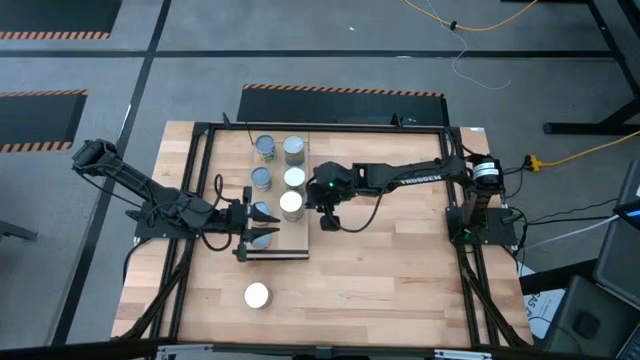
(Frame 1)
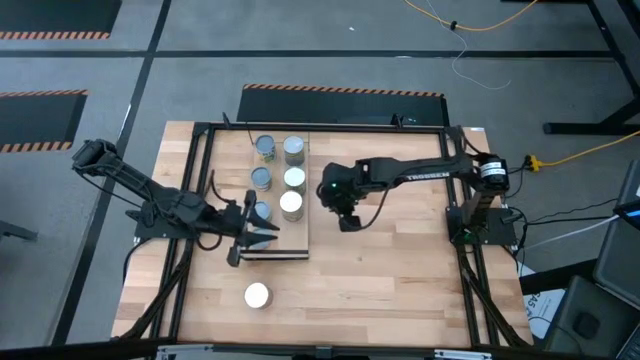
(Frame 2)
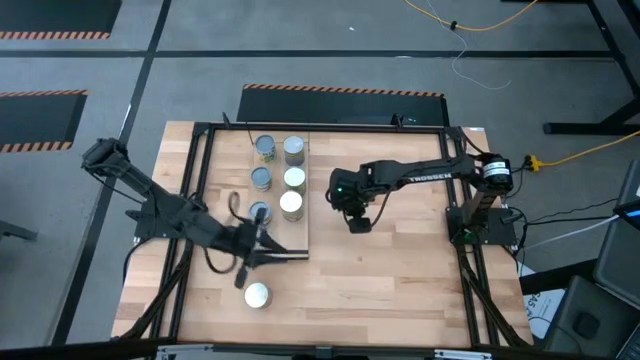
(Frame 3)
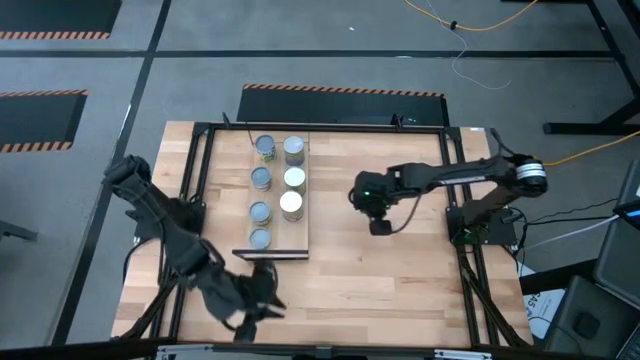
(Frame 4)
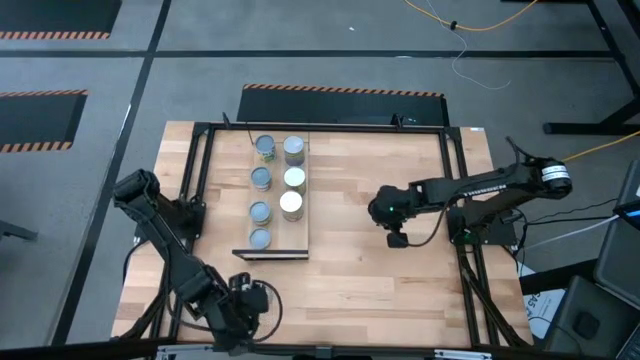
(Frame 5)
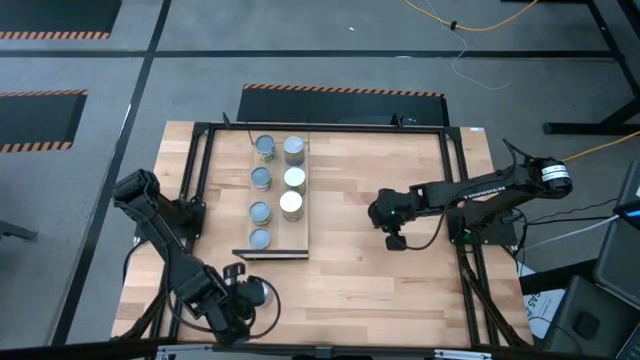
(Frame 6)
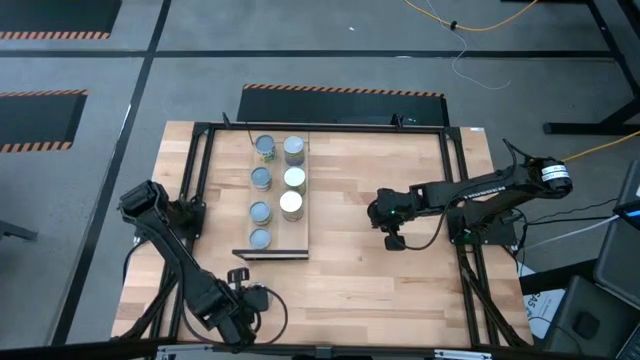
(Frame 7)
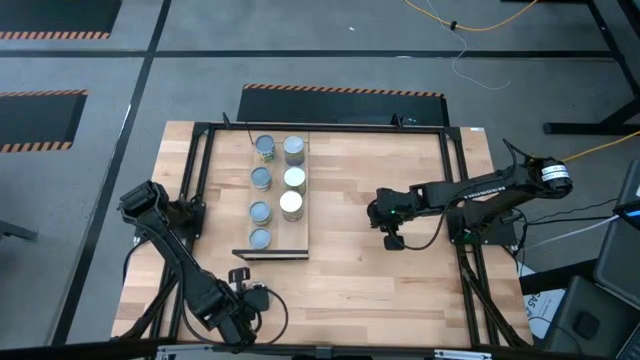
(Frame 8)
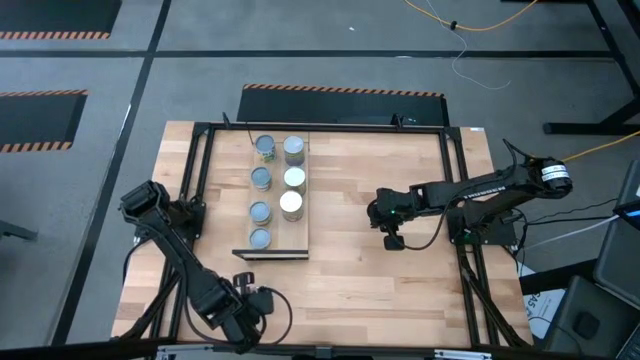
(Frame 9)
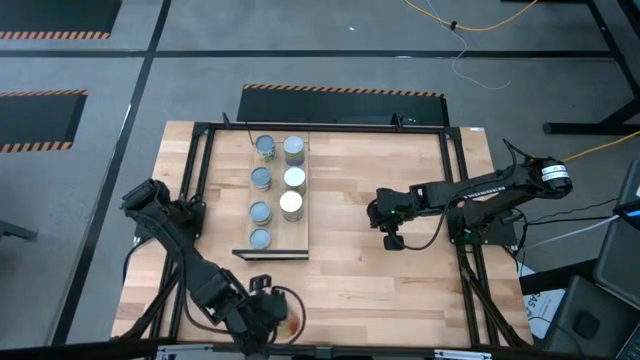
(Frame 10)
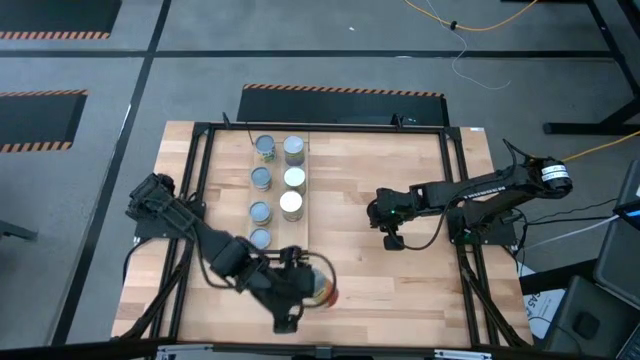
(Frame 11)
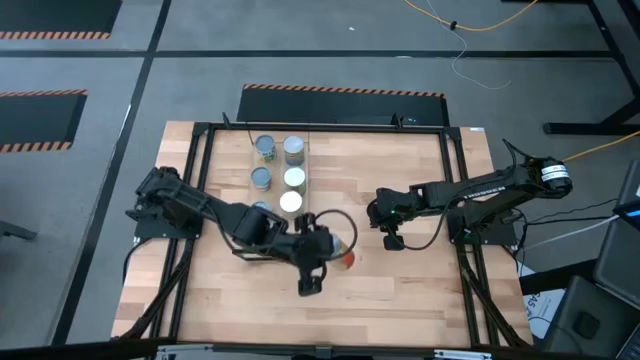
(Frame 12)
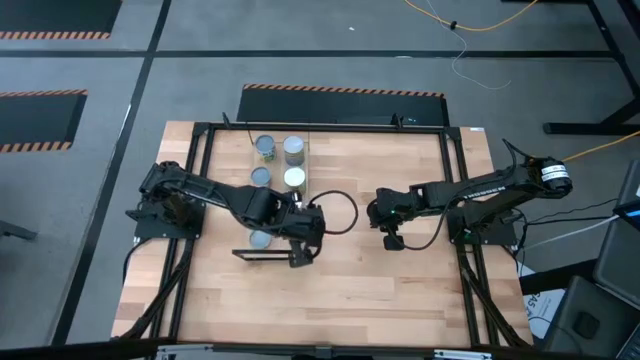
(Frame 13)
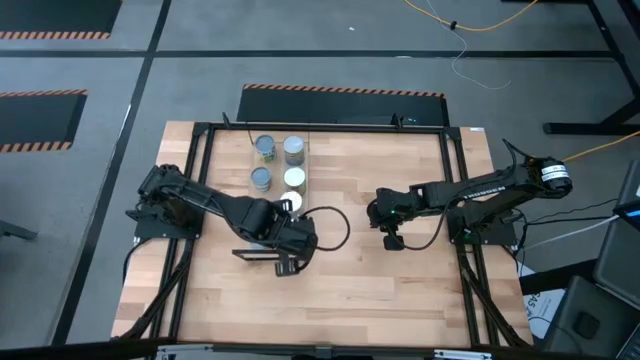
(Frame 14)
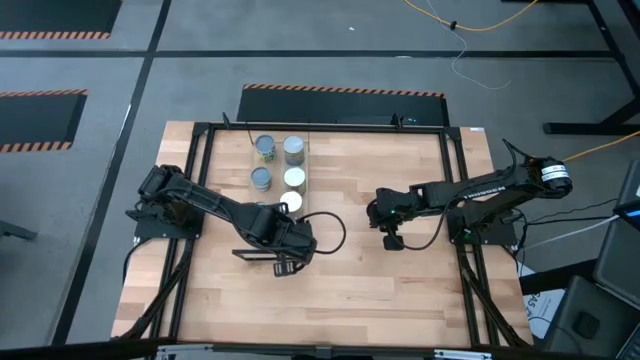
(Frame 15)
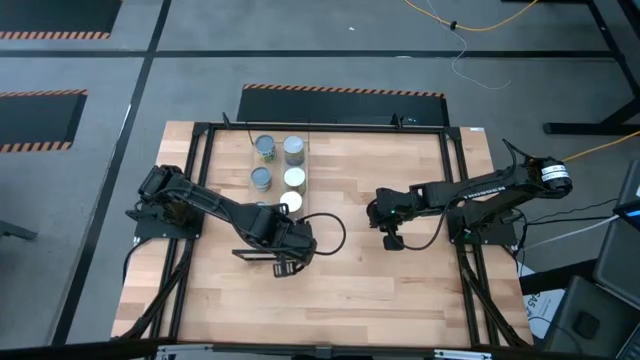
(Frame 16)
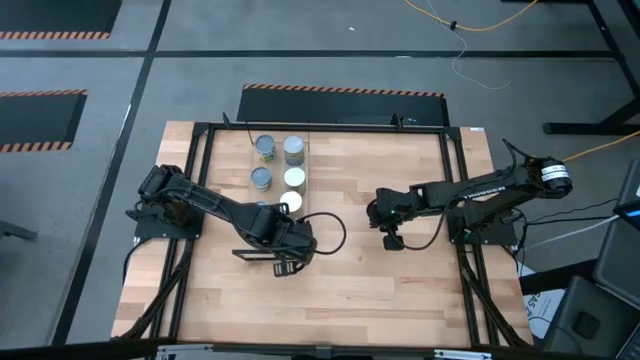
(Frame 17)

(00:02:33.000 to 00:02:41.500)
Task: Pick and place cans onto a shelf
Put the large canned pineapples on the shelf

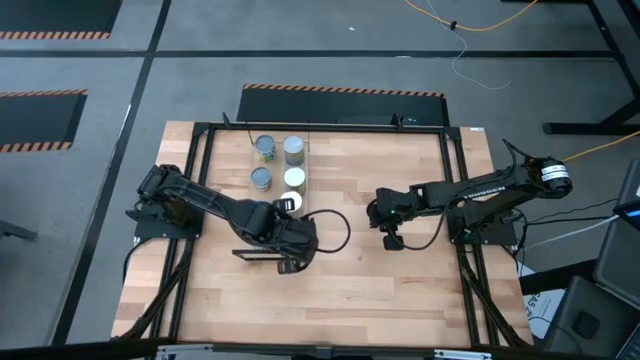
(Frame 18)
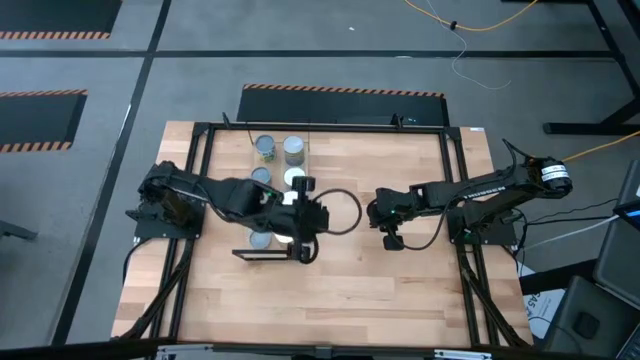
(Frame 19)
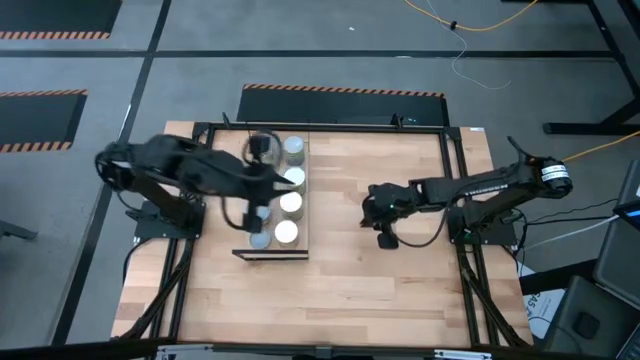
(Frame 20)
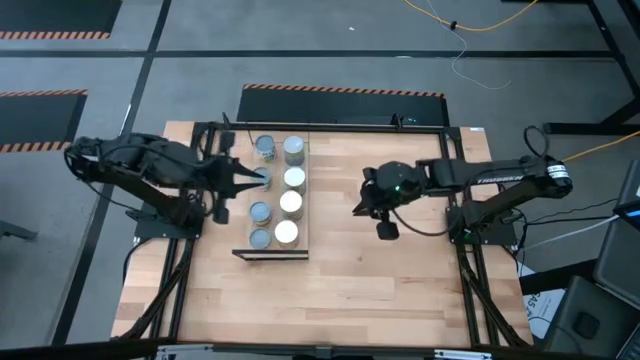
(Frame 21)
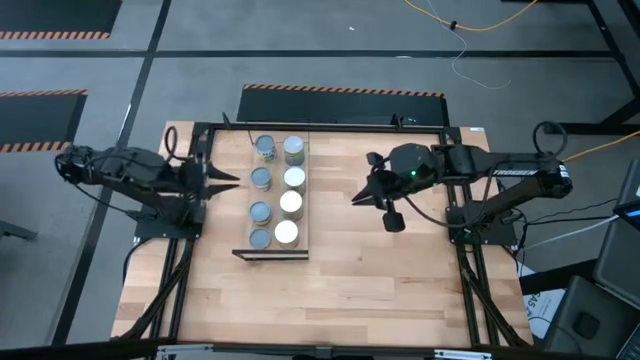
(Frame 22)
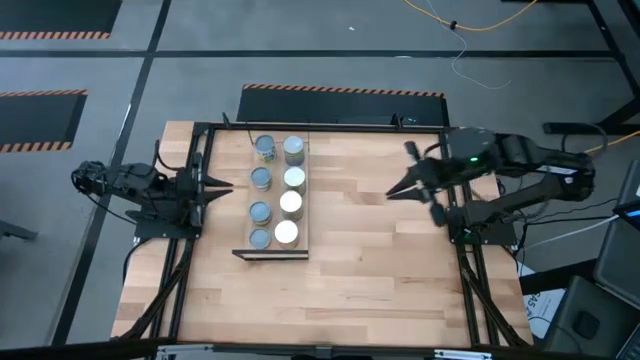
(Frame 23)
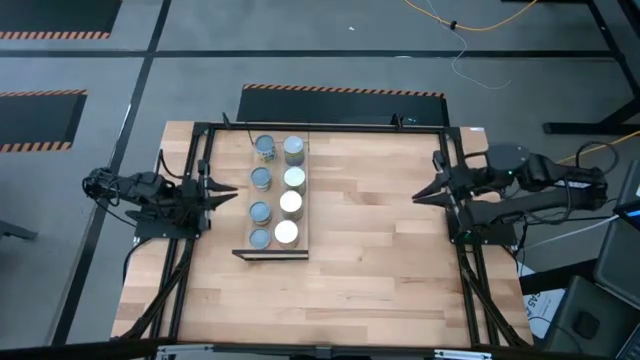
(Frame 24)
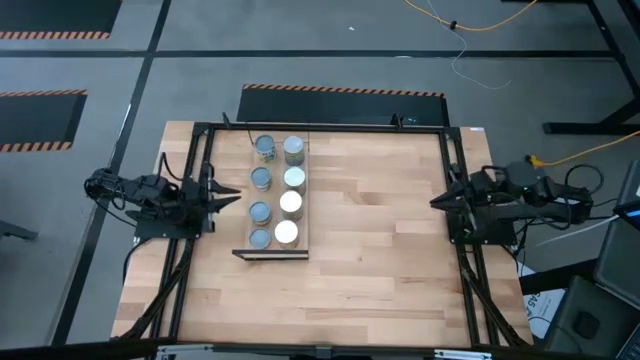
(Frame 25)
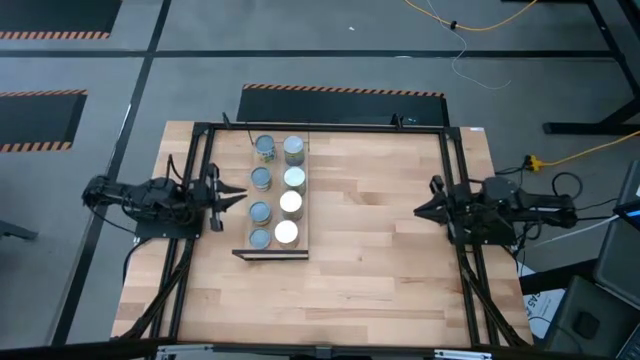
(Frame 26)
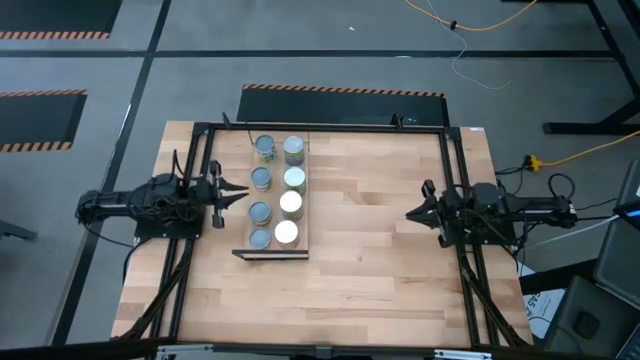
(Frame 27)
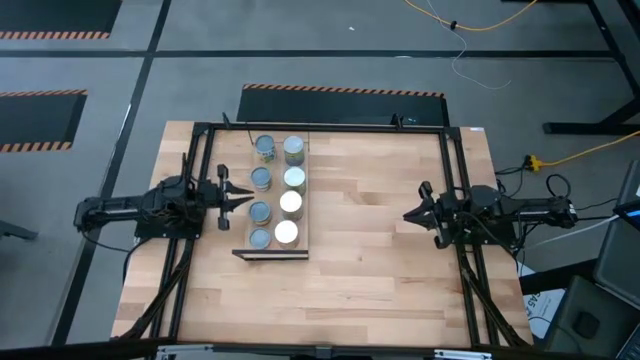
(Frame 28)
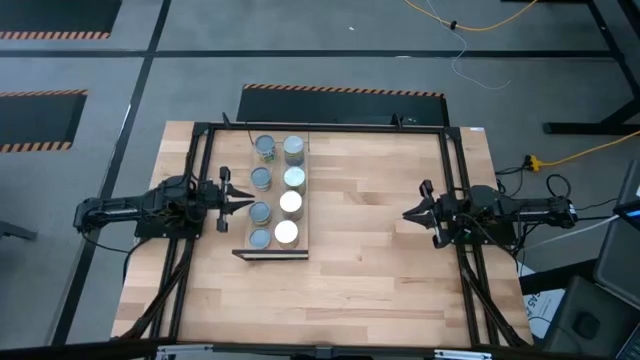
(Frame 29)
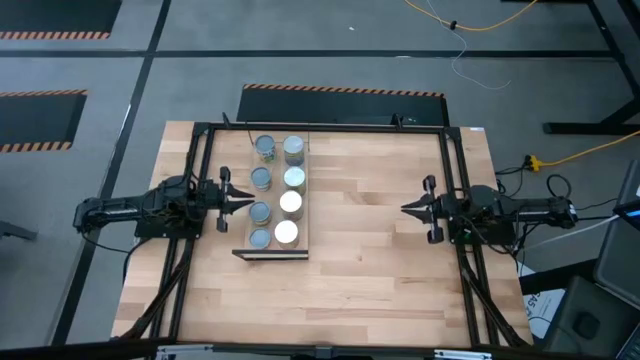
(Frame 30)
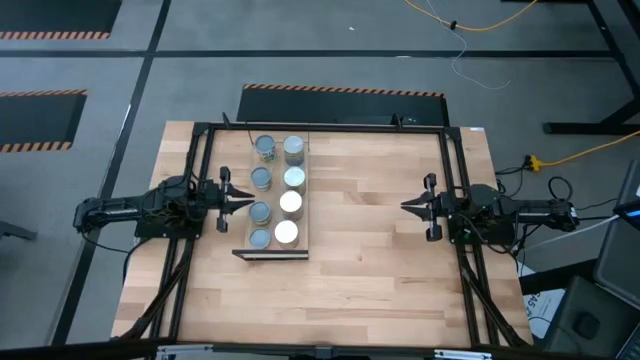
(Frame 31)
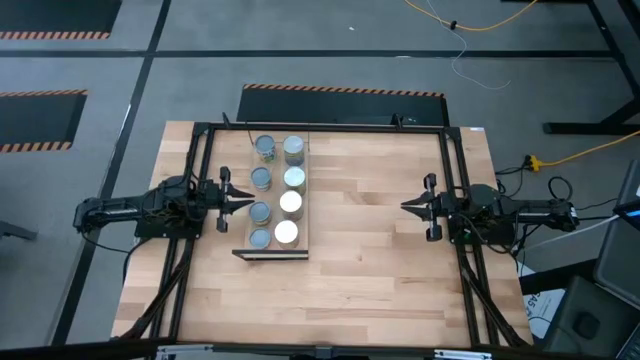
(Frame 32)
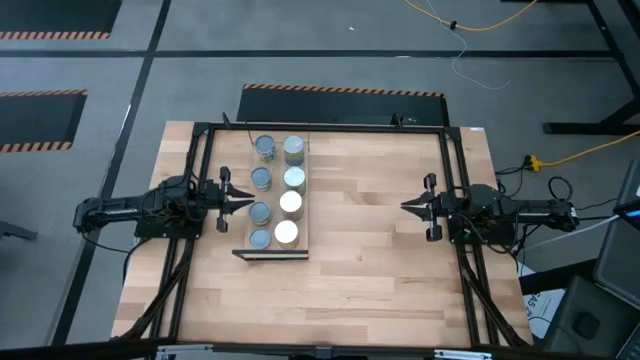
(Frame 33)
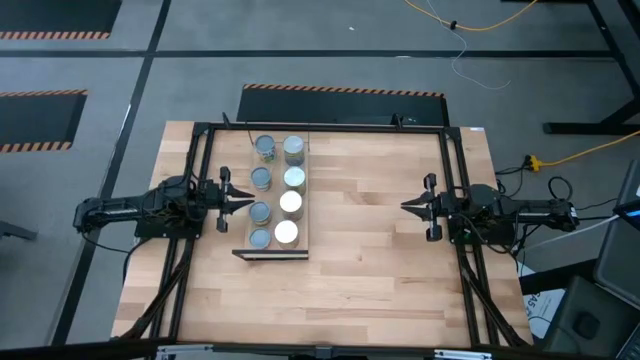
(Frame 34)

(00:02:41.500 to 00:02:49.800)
Return to Home Position

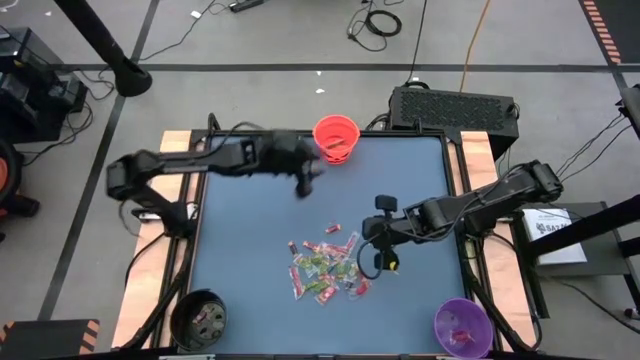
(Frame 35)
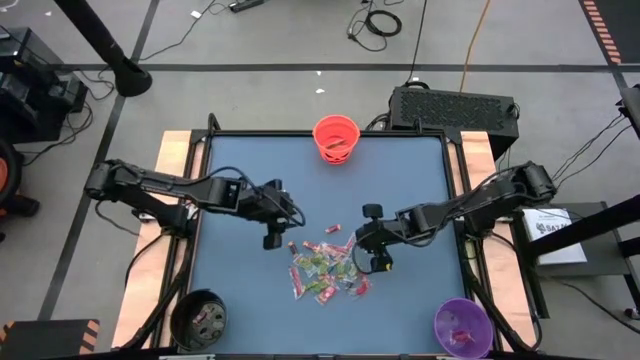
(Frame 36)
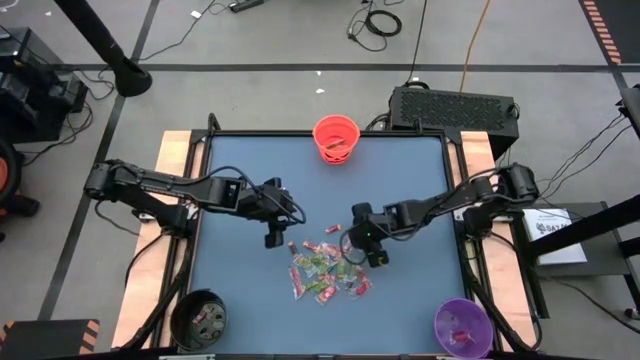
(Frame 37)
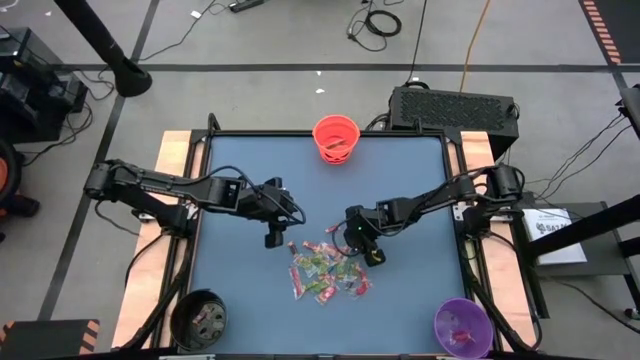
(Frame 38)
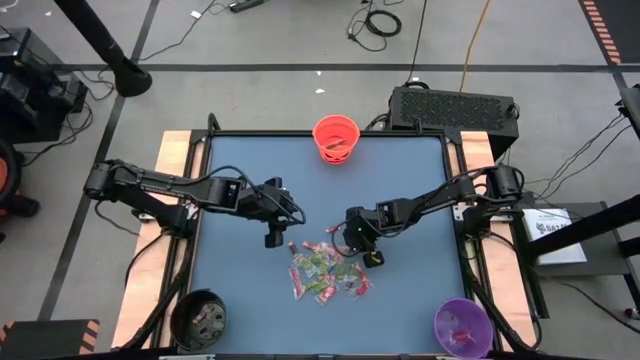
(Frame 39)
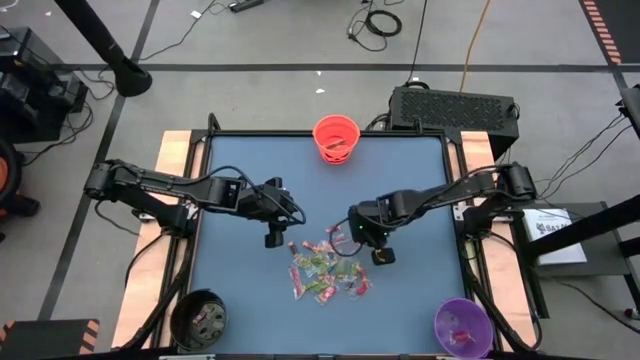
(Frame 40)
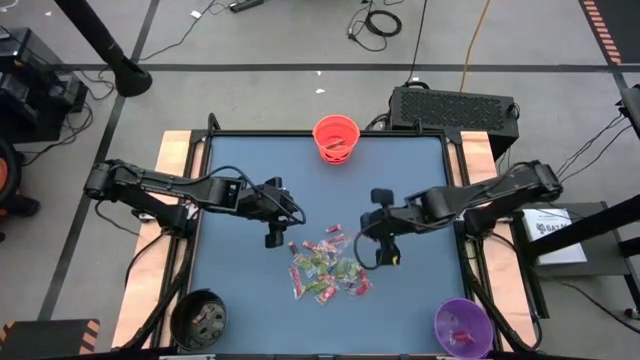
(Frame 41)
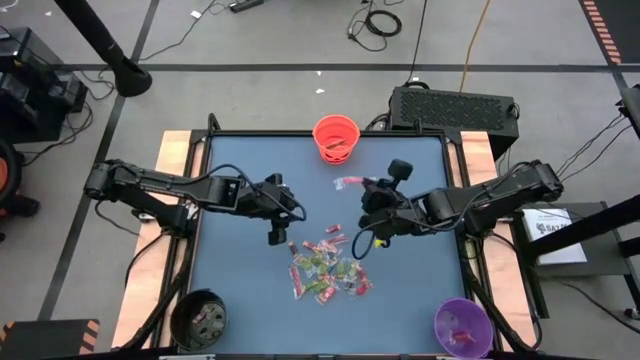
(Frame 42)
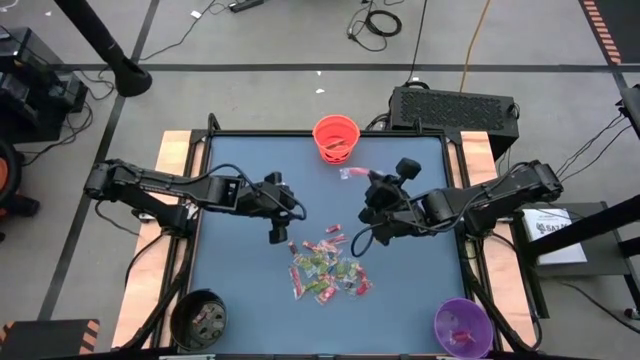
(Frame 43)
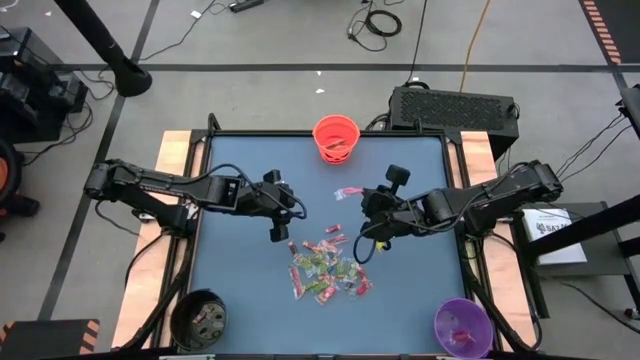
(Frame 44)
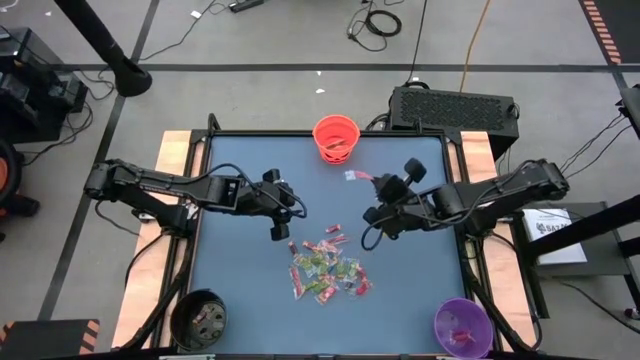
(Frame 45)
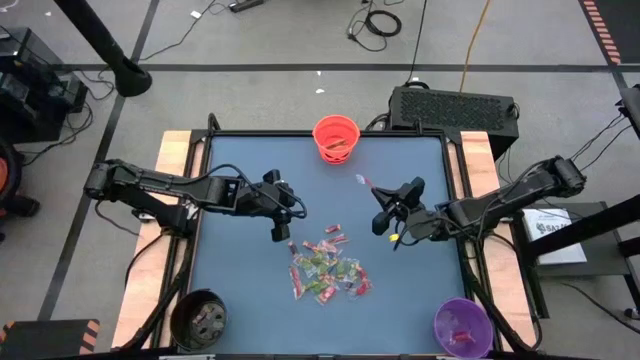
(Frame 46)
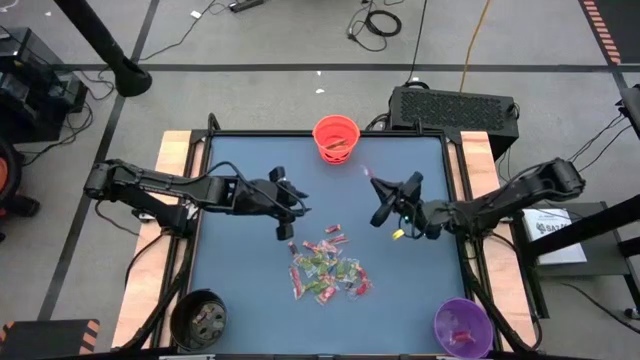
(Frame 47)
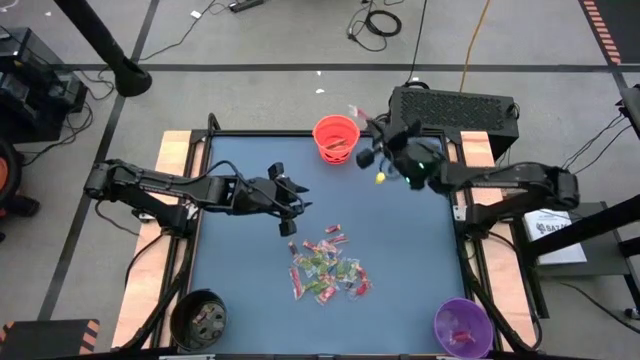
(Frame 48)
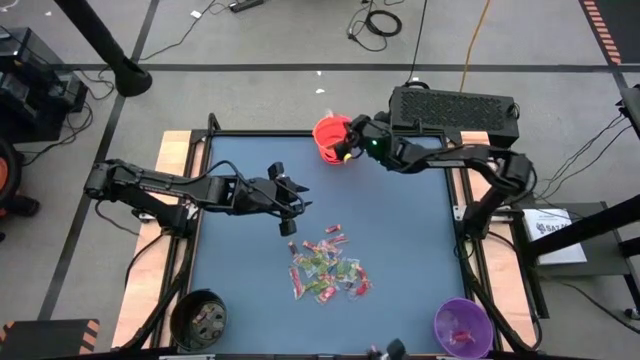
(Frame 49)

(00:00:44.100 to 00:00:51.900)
Task: Sort candy by brand, put in halloween buckets
Put the long orange gummy into the orange bucket
